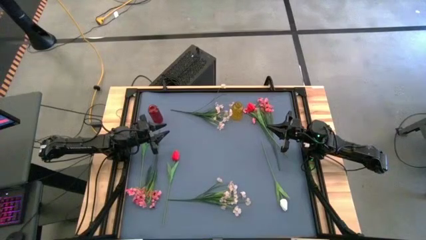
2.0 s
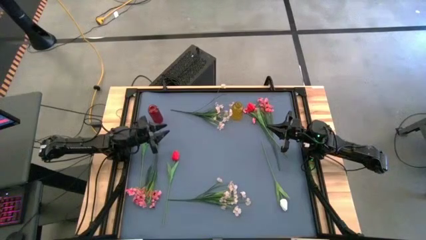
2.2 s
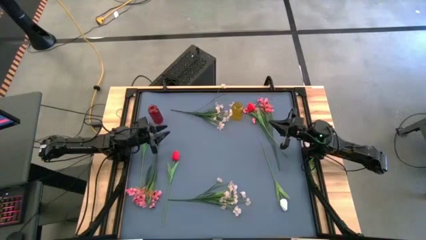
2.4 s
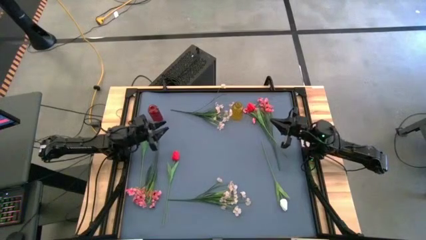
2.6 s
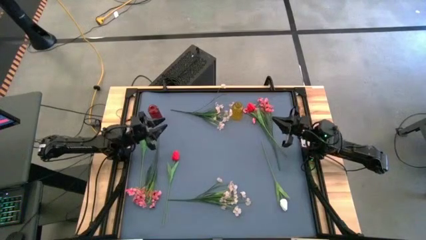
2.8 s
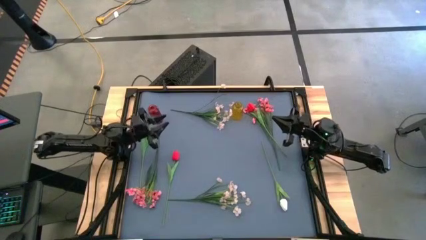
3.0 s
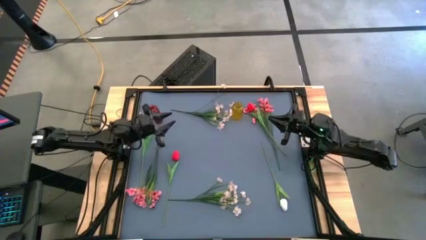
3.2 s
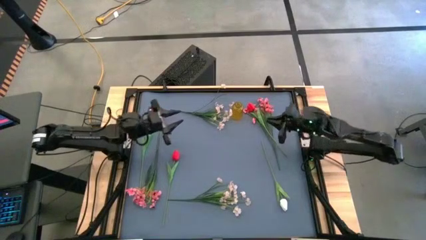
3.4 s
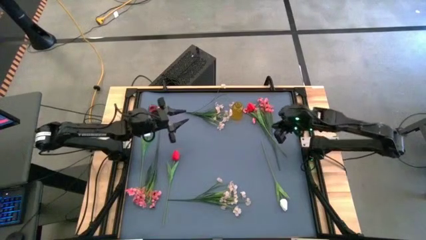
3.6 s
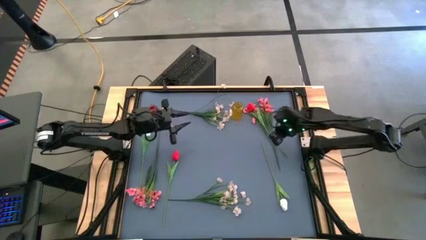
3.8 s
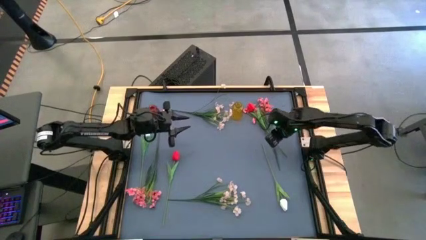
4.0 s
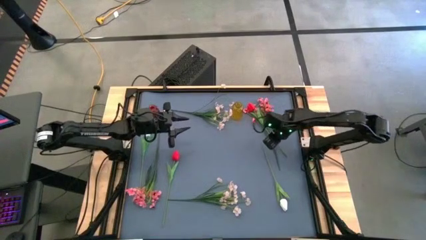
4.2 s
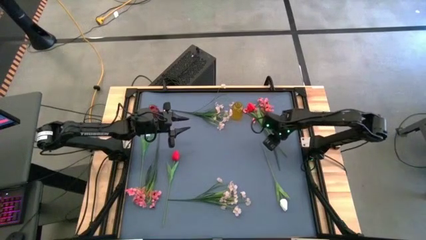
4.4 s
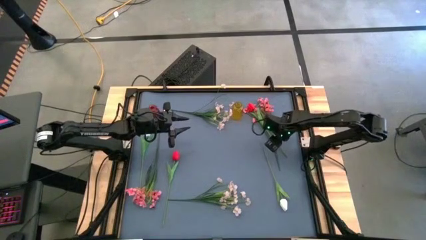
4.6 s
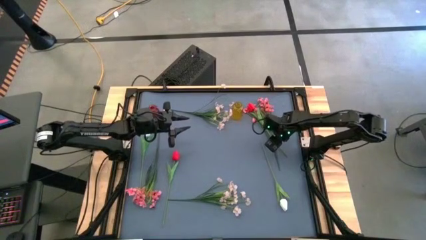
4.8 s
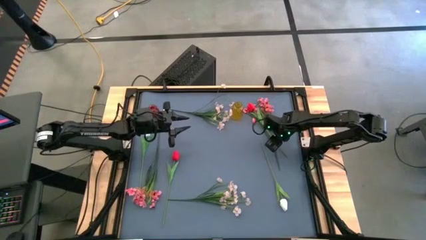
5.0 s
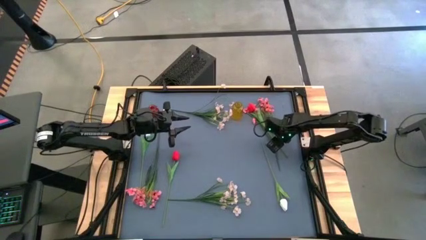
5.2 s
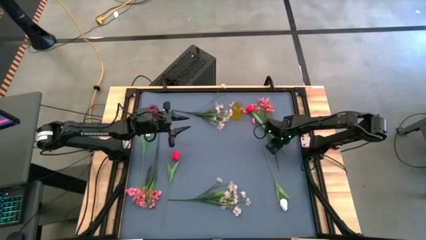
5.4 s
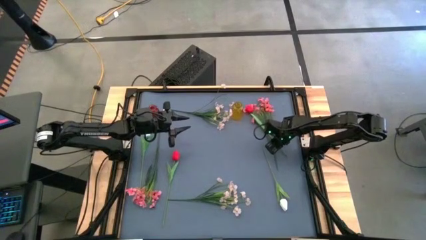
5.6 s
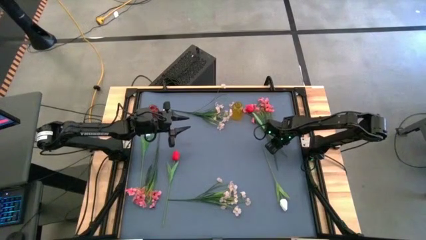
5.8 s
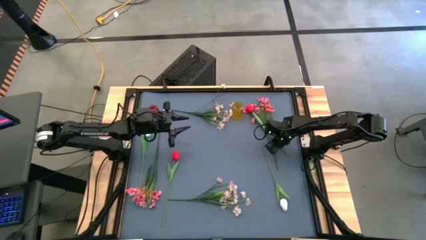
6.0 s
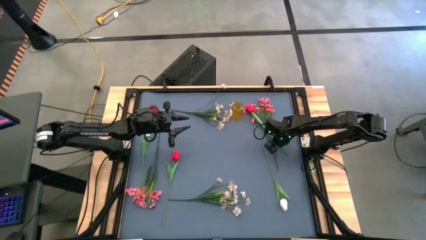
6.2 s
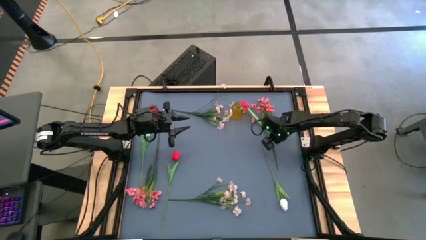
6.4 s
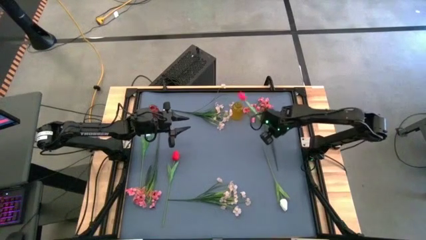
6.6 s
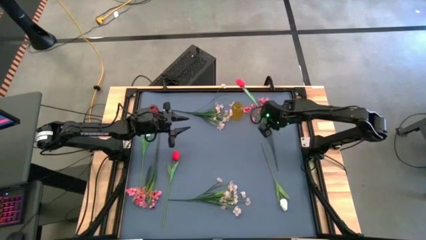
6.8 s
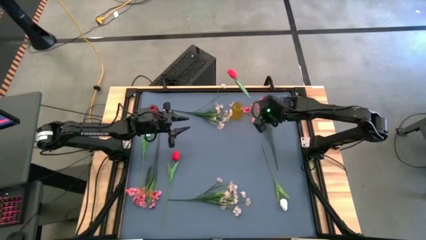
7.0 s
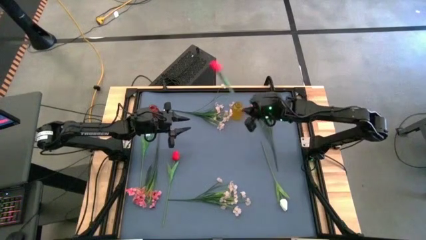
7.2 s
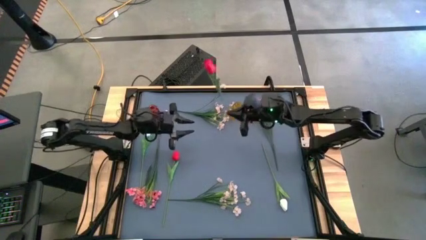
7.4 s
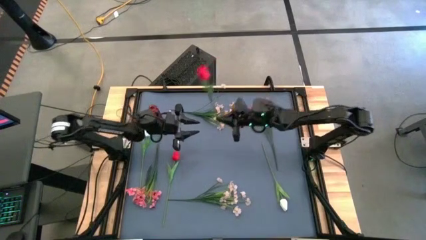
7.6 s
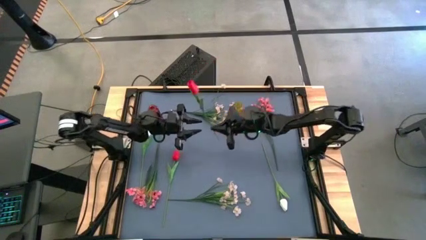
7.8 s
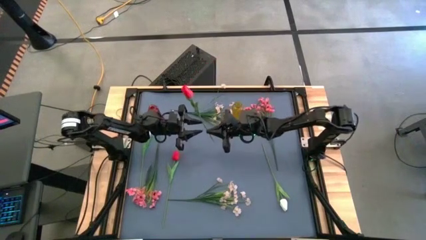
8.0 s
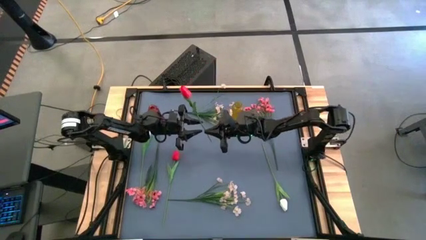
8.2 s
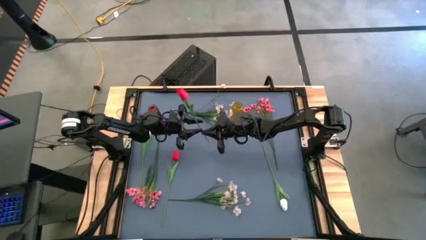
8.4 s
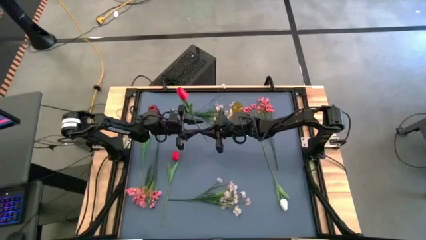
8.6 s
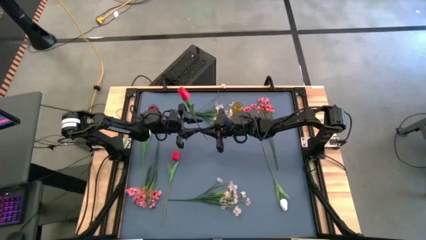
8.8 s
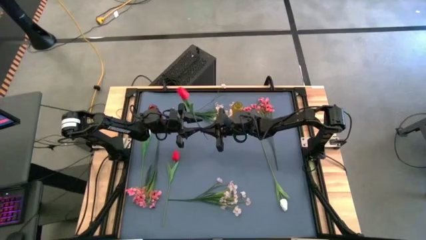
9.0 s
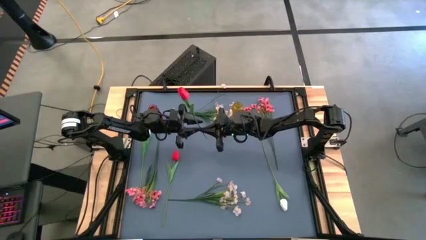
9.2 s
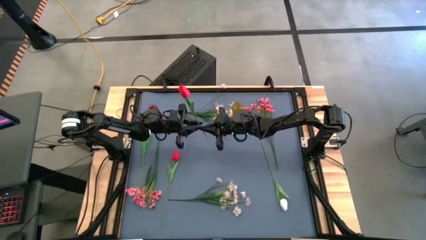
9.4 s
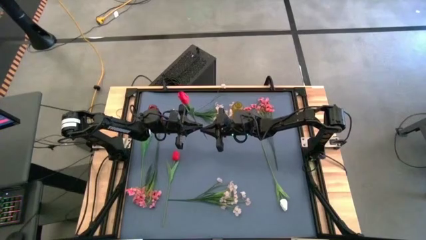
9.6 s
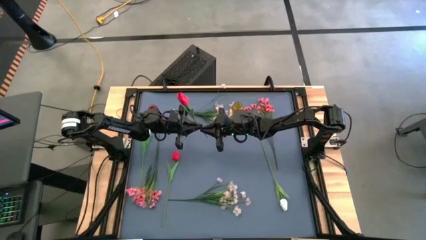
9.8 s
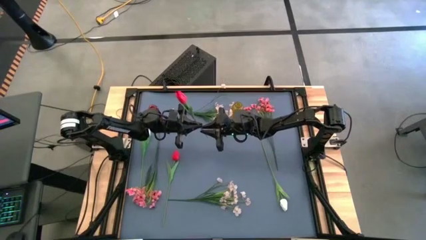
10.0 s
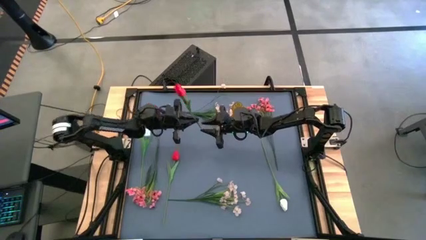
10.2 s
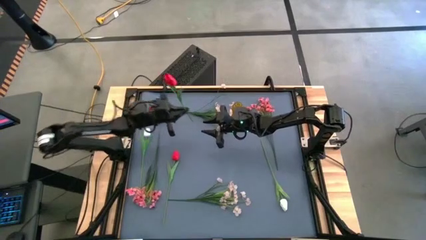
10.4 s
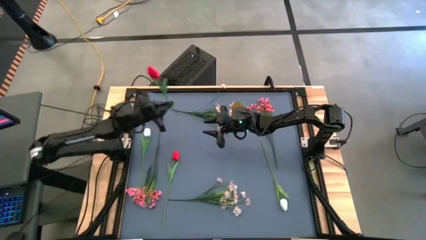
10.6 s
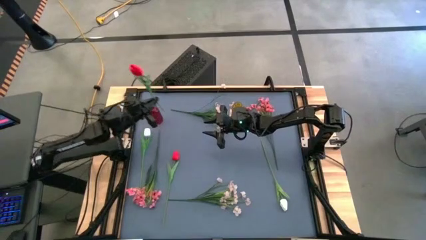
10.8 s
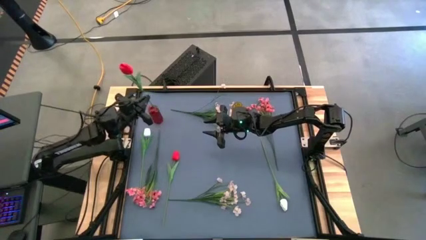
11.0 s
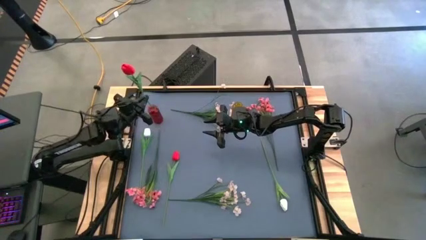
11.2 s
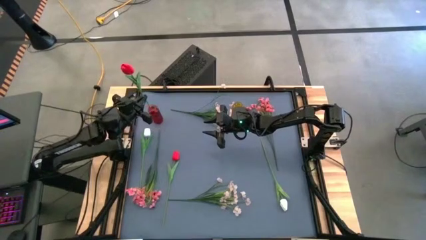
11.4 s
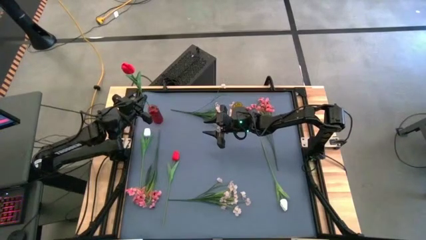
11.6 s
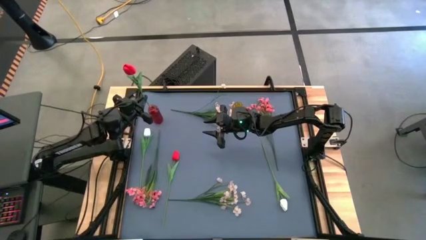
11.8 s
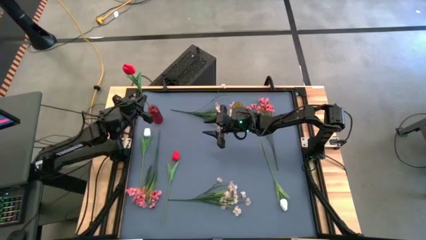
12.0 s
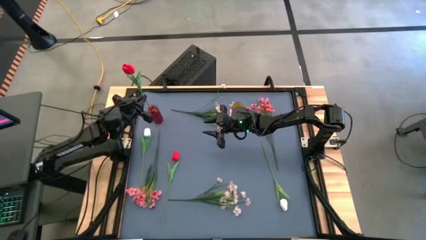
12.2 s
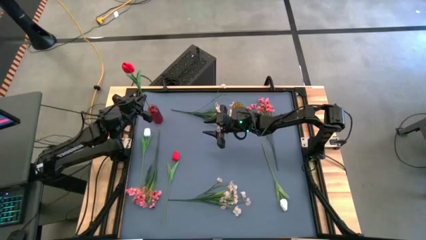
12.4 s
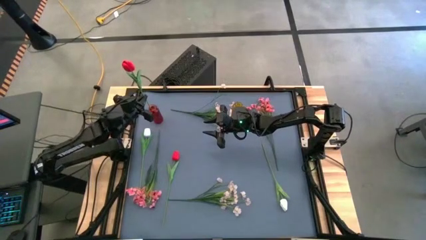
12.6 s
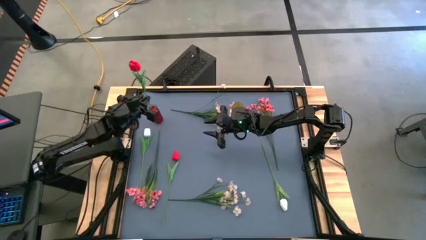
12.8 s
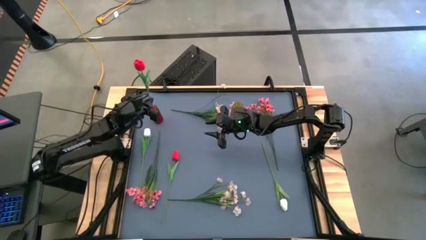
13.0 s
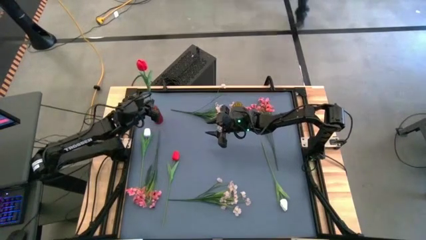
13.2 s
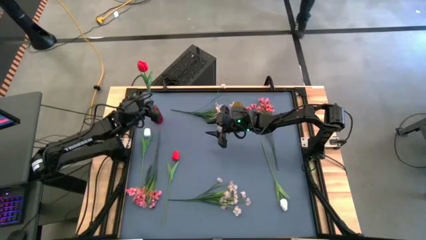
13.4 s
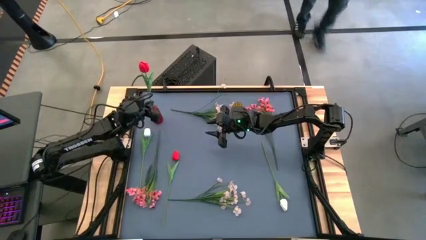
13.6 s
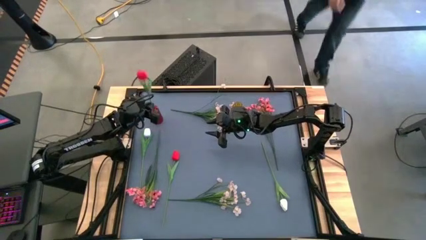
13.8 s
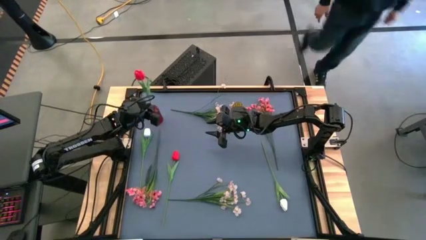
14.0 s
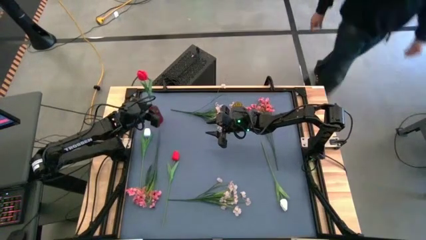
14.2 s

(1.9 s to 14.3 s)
Task: Sort flowers into vase by color
Put the top red flower into the red vase

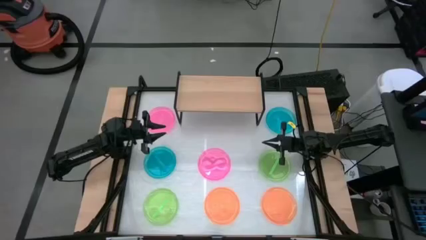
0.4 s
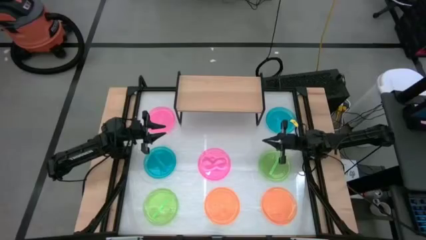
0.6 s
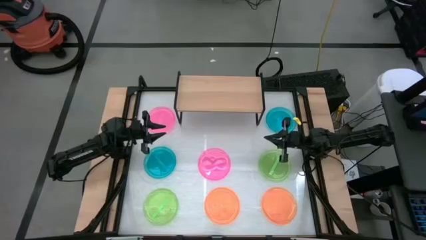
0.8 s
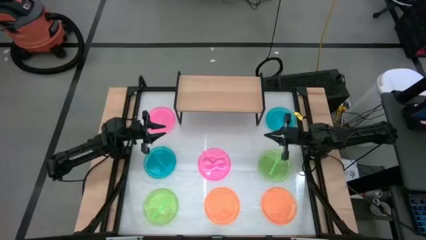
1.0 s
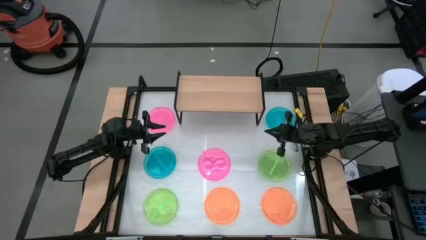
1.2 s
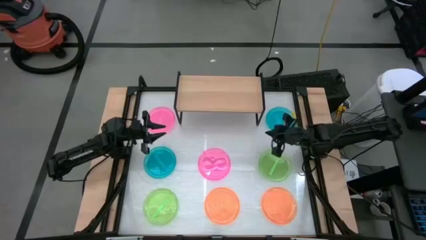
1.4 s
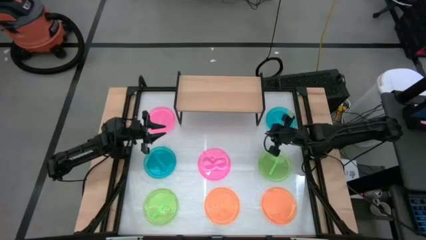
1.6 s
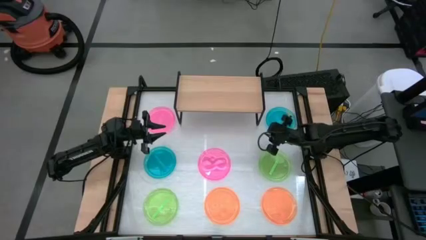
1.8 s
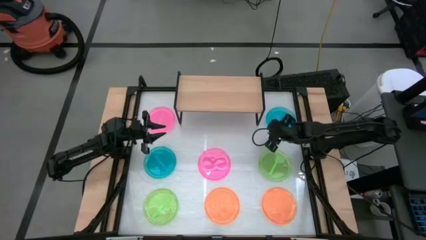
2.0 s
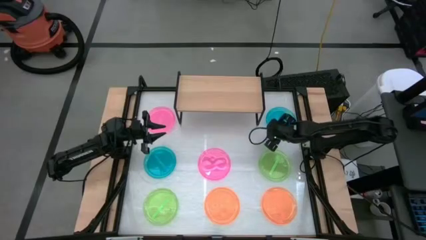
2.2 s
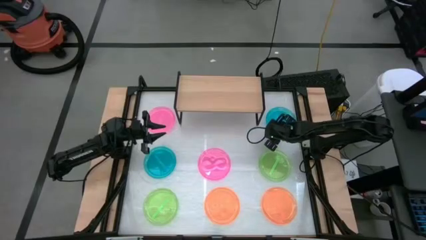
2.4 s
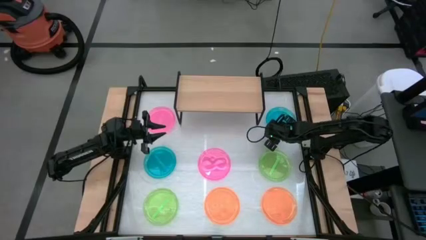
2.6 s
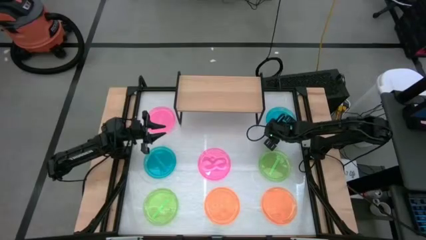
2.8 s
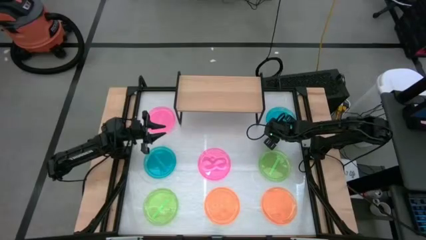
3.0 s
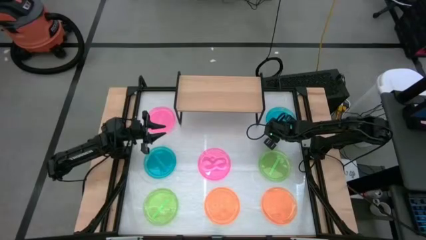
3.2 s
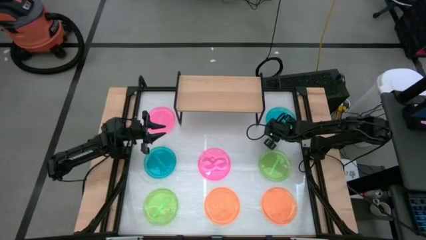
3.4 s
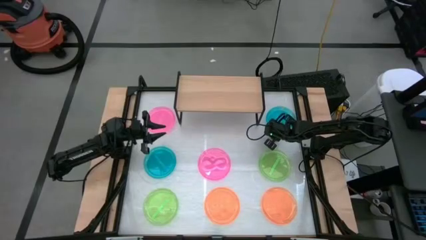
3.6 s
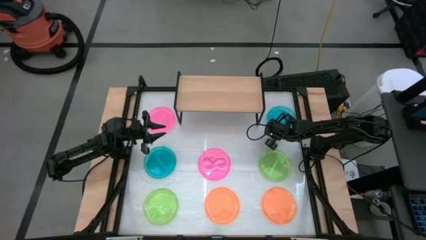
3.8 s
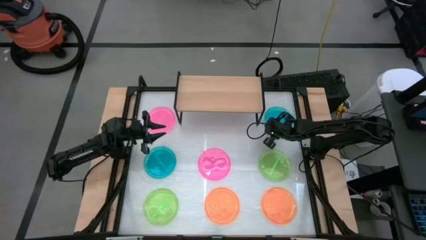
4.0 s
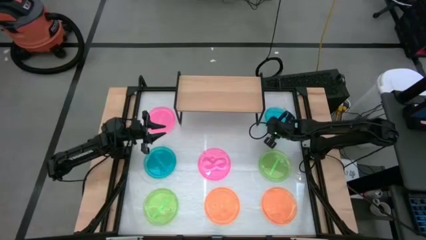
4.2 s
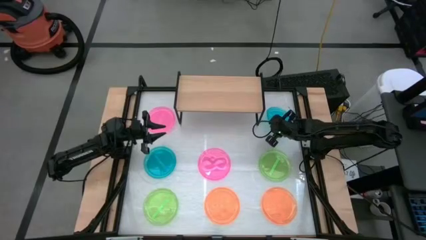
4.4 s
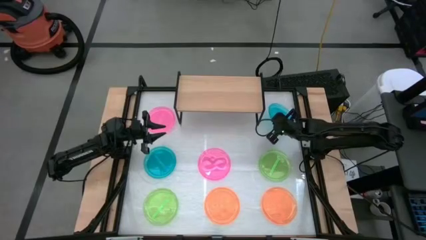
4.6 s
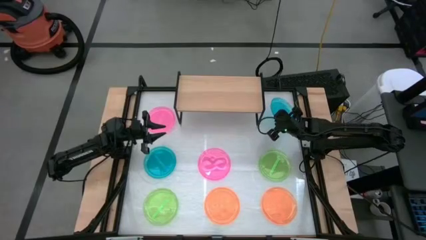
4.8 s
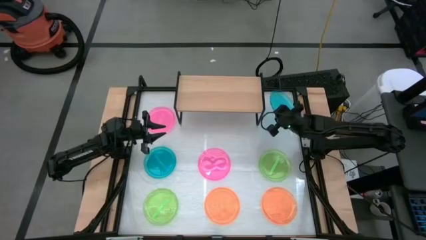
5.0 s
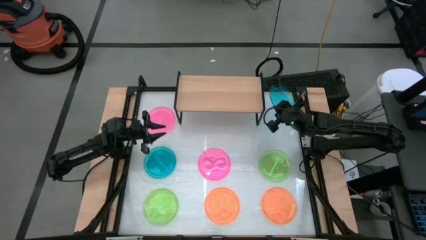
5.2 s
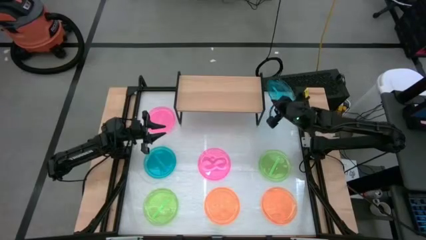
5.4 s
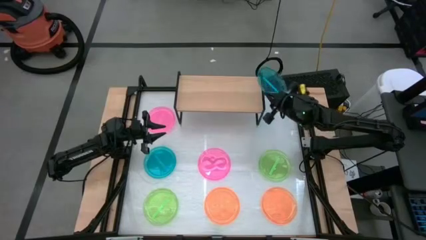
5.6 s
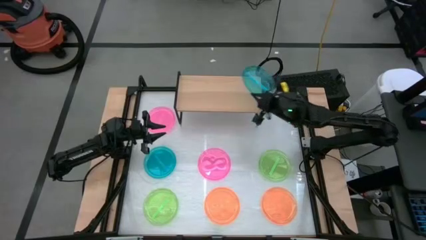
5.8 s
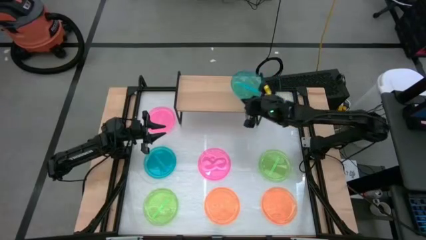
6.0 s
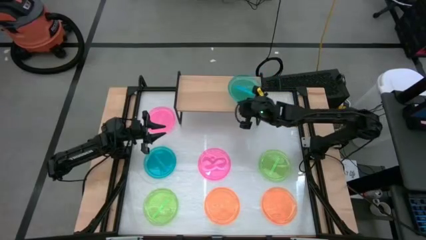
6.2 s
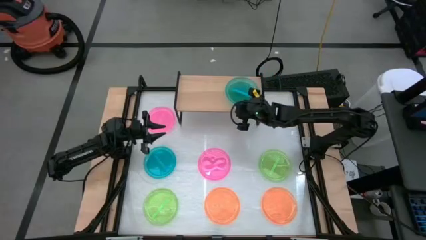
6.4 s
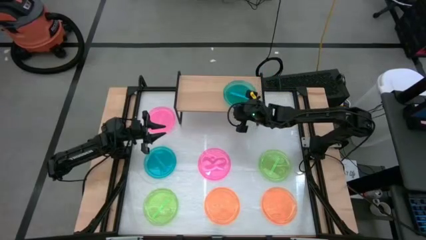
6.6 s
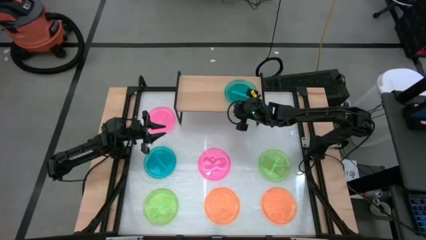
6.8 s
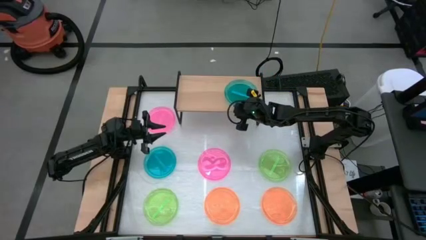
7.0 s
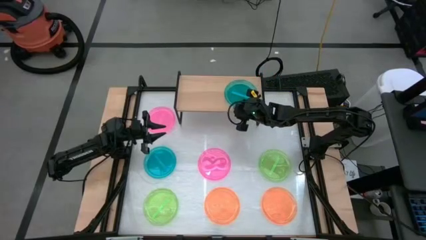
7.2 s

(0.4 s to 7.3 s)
Task: Place and stack plates onto a shelf
Put the right blue plate on the shelf
